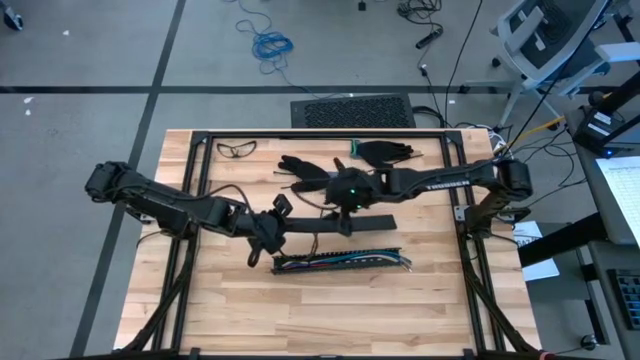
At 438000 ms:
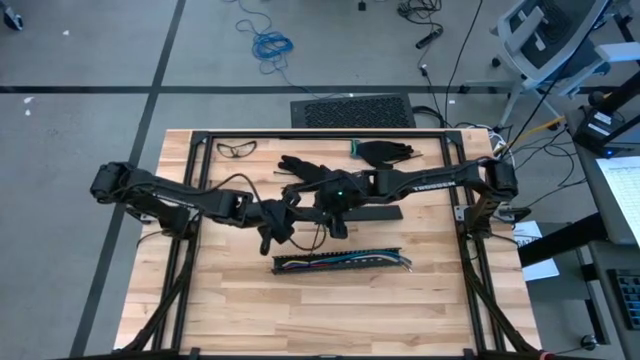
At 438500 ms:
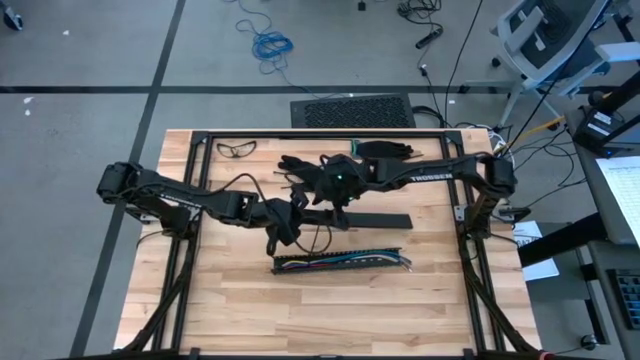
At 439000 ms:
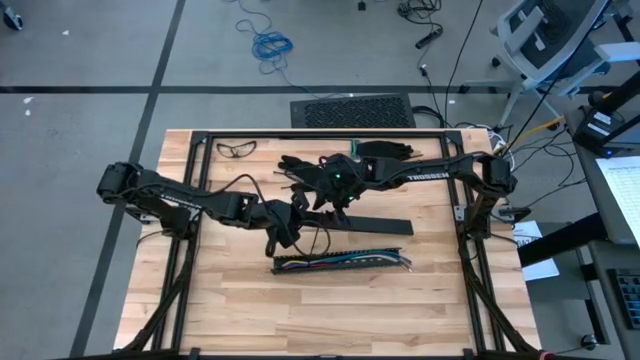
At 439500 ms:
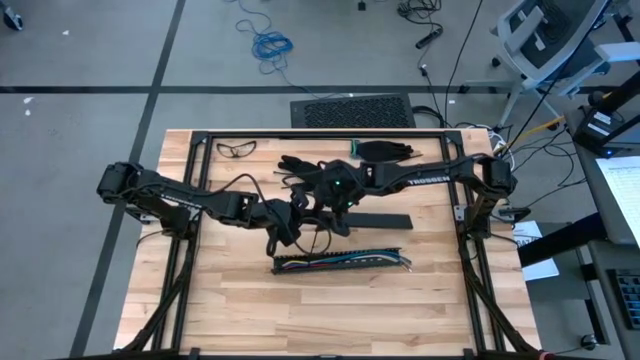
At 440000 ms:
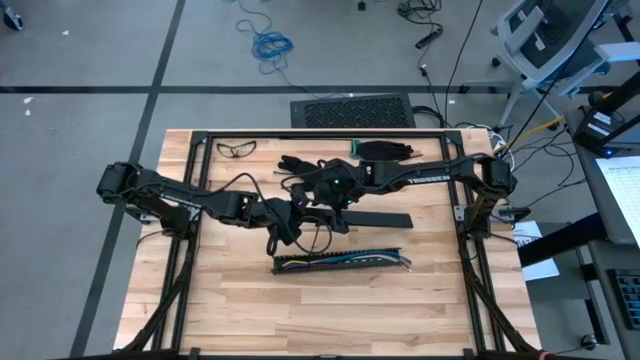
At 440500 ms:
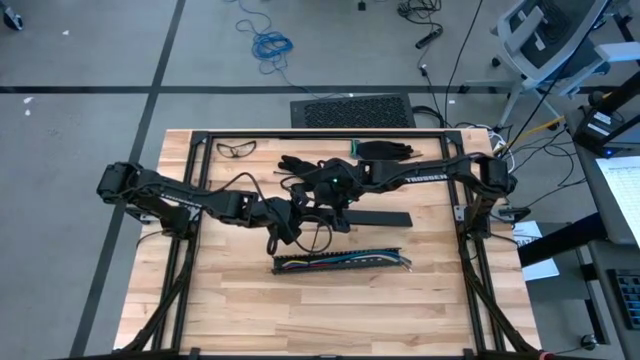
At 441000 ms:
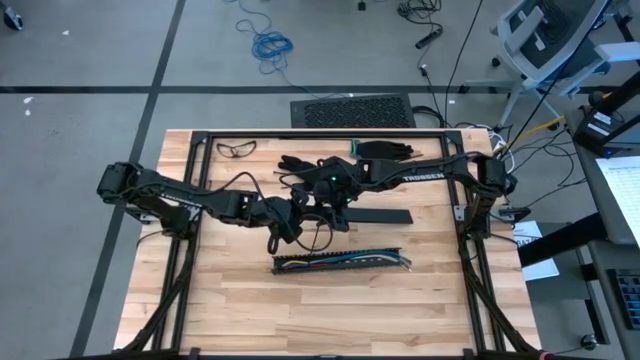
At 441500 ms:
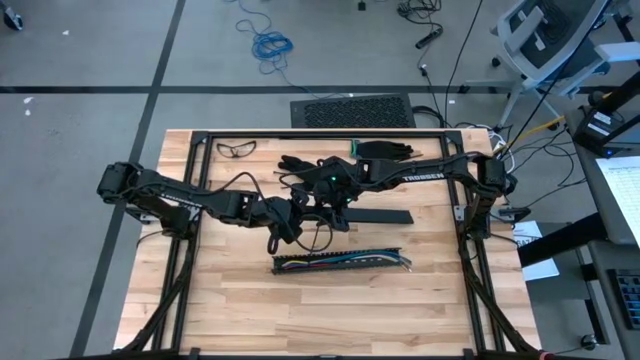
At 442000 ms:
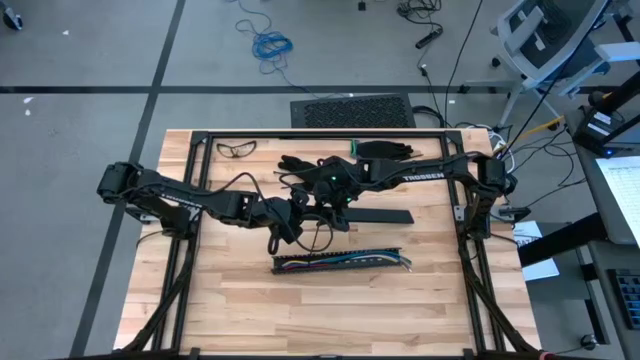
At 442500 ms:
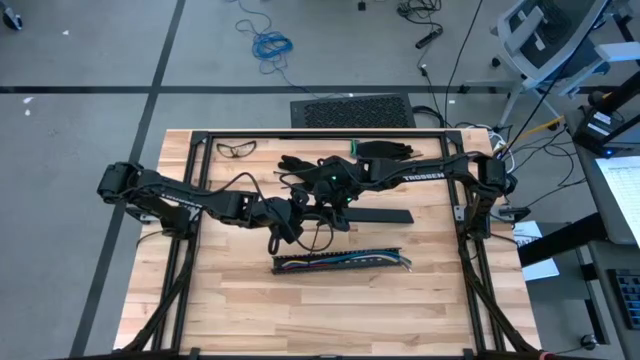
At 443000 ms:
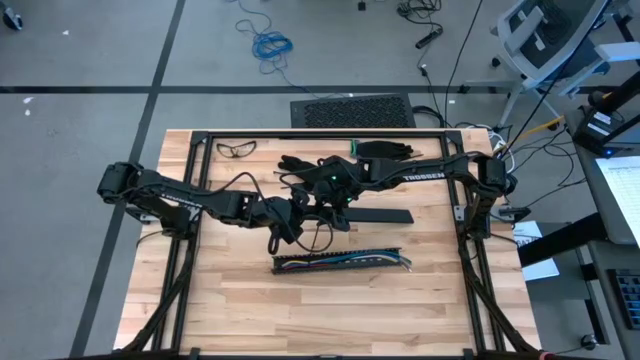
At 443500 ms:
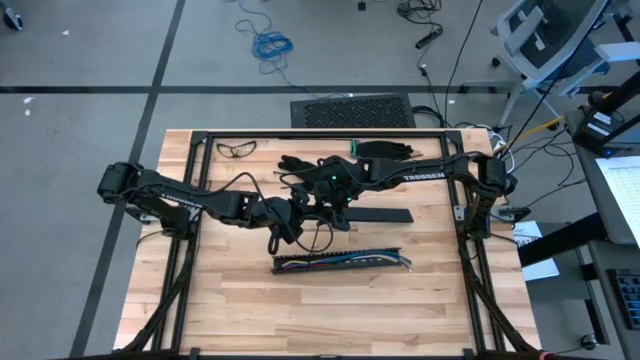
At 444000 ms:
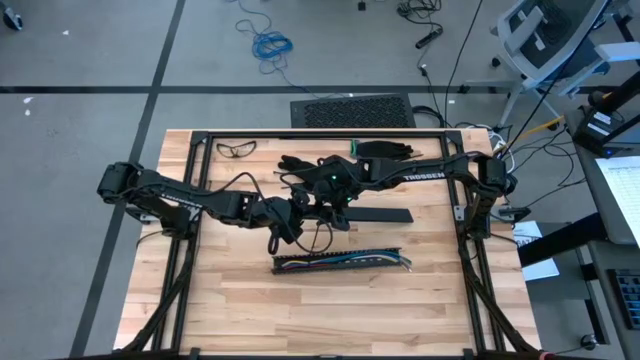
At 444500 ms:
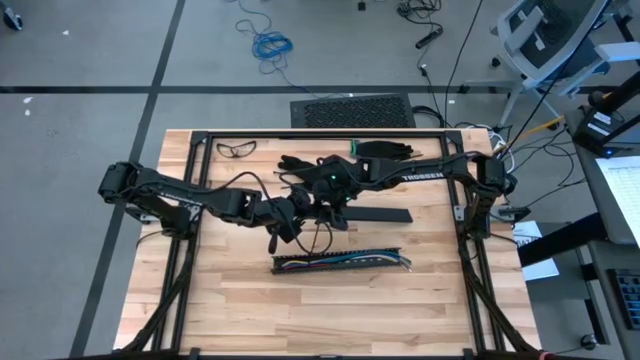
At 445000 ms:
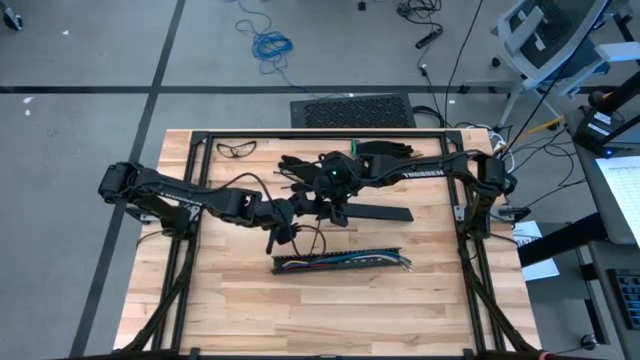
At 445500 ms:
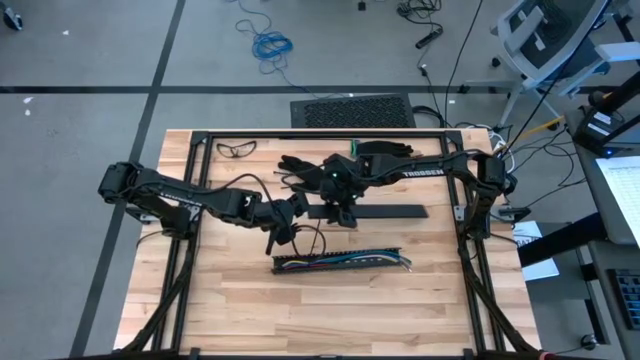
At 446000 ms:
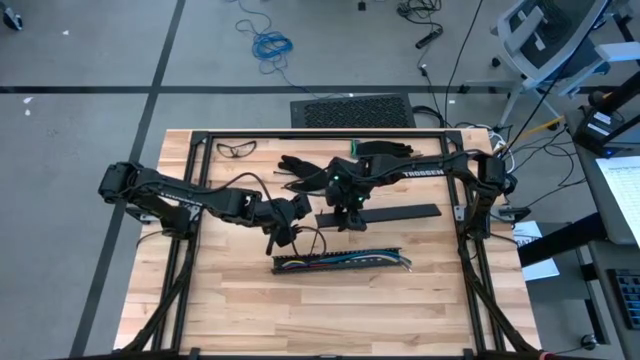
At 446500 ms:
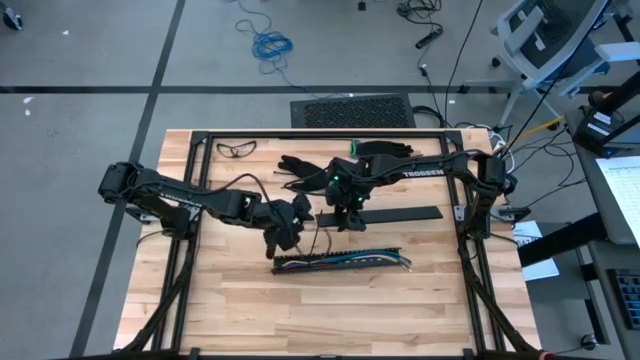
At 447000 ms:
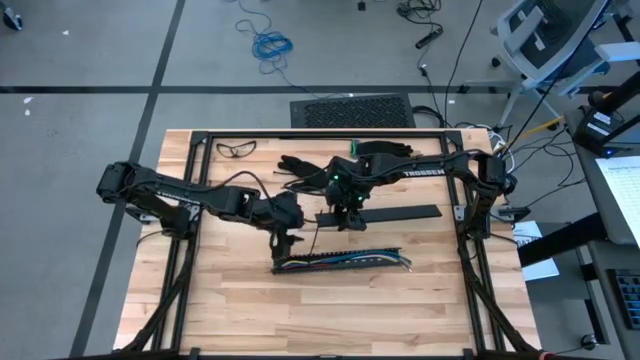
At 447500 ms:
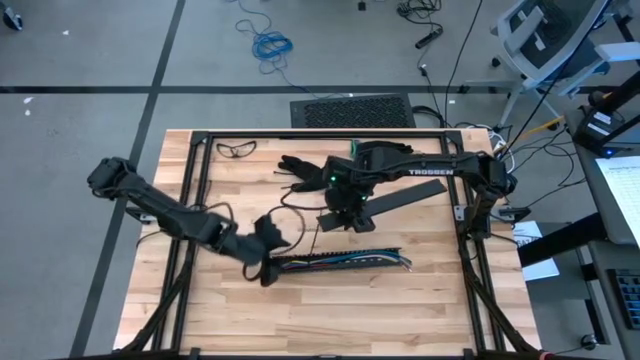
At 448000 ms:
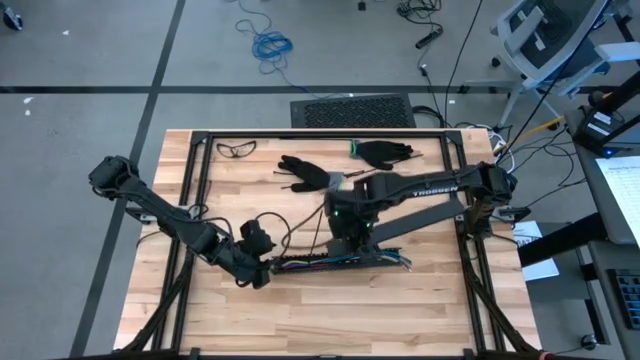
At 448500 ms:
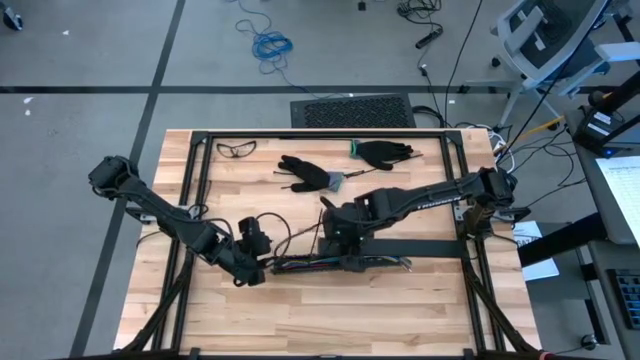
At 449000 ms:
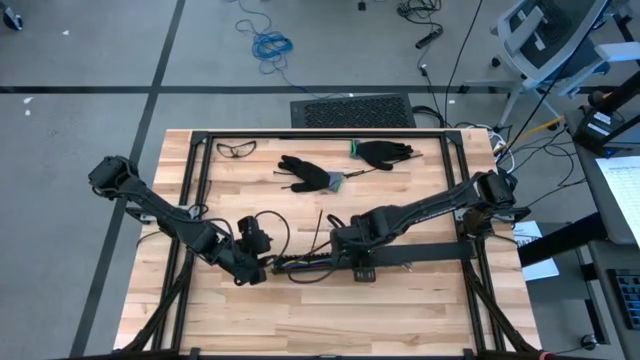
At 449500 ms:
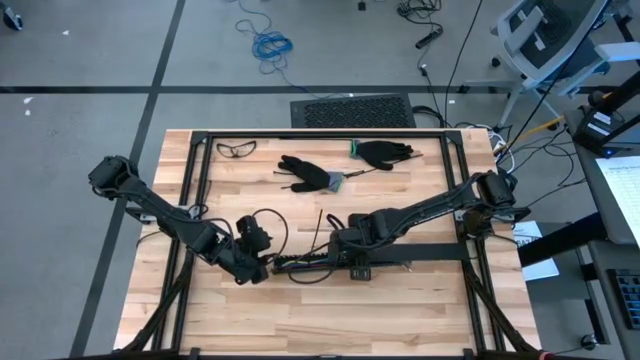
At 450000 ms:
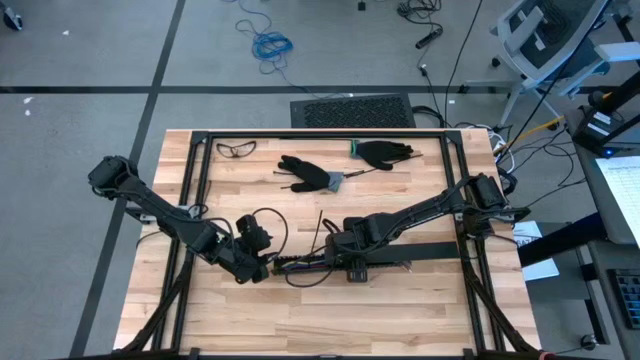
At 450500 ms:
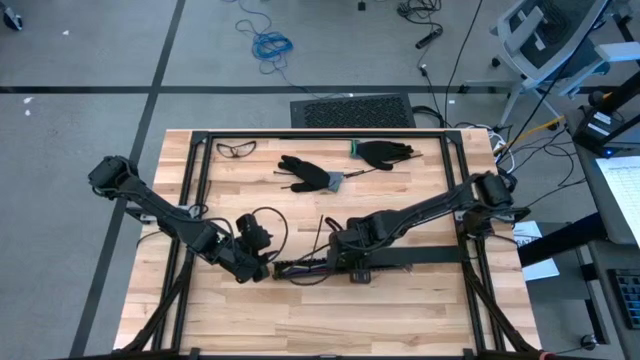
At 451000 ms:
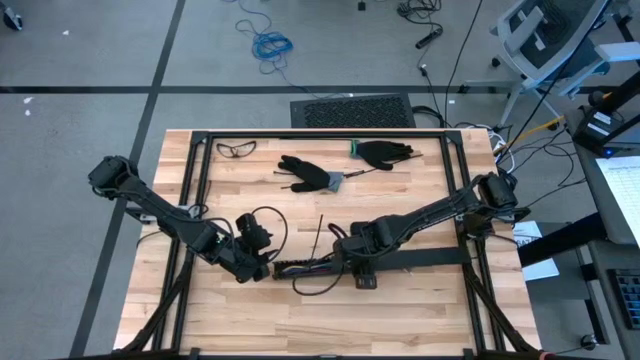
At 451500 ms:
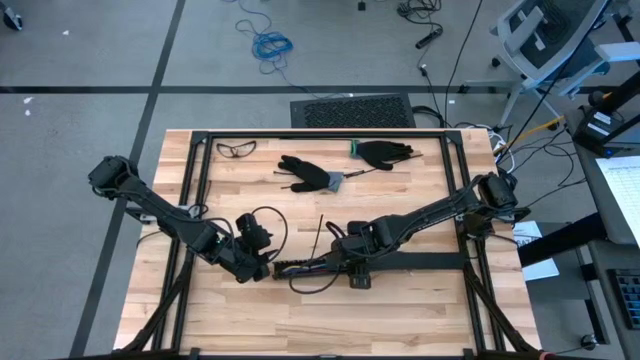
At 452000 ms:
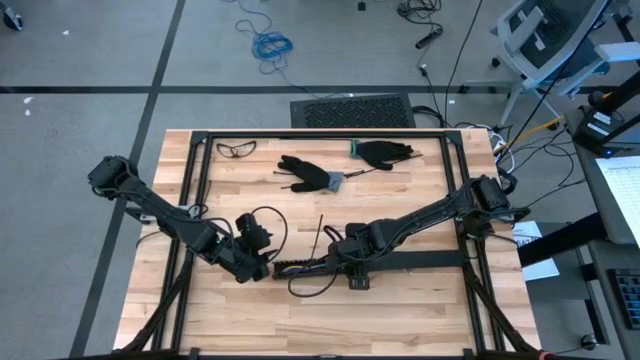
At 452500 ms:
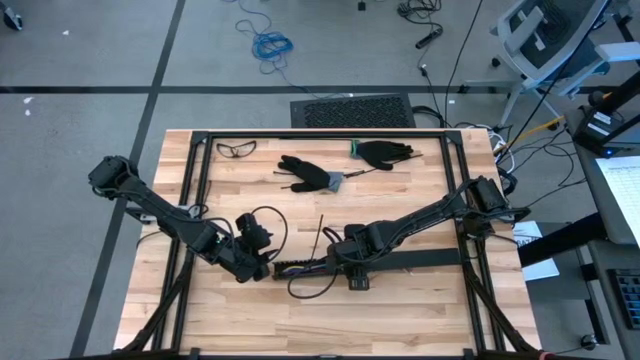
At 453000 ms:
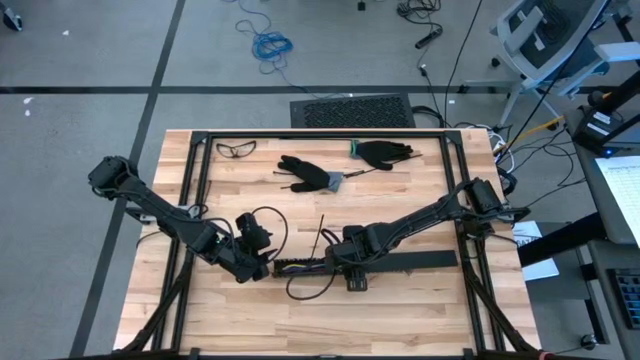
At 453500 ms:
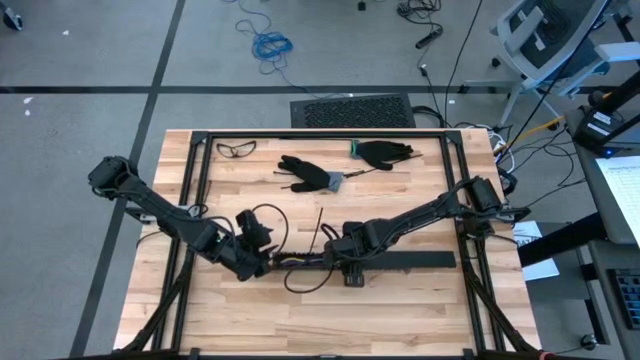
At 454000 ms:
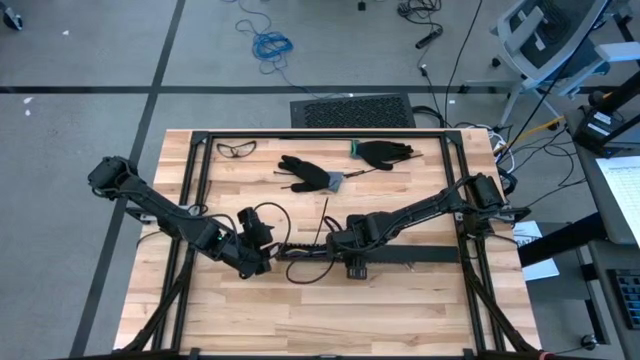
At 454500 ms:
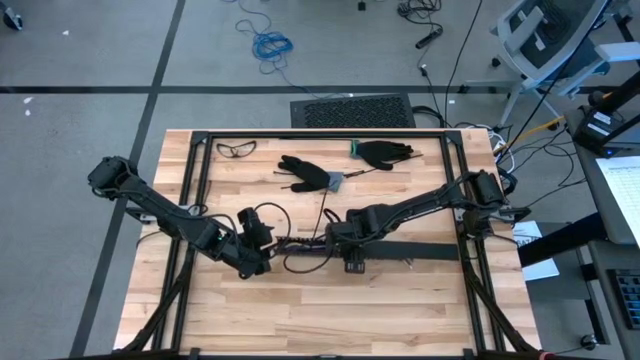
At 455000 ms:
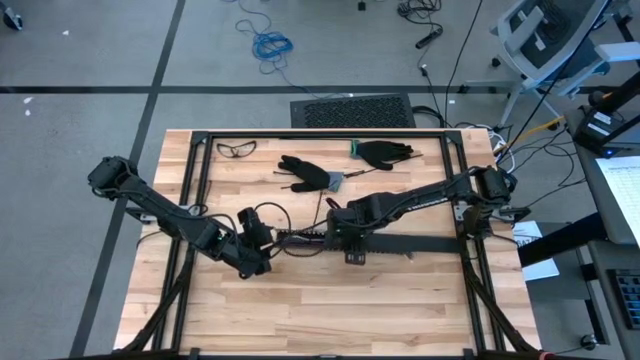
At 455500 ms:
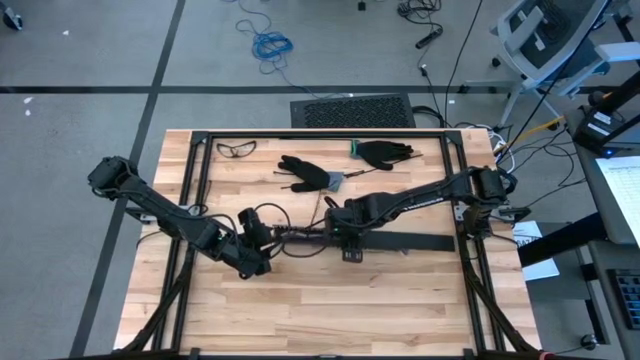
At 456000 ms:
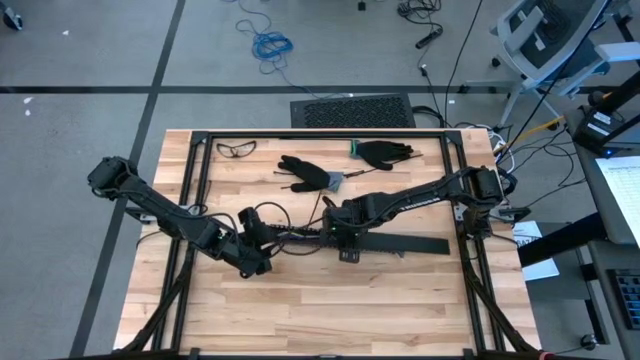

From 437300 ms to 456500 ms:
Task: Ziptie cables
Insert the black cover of the black cable duct

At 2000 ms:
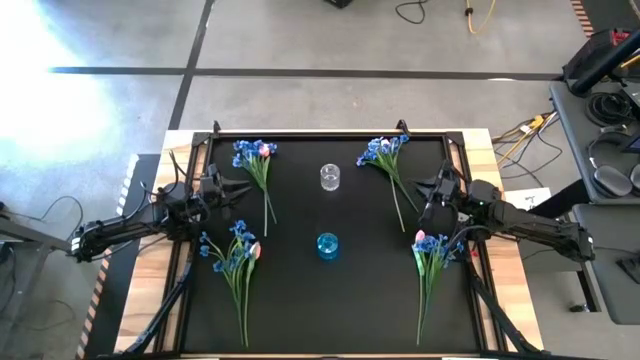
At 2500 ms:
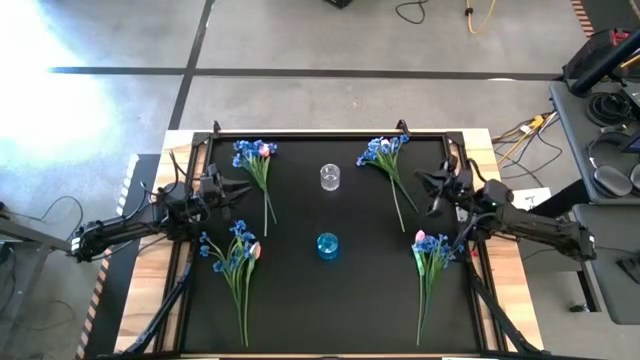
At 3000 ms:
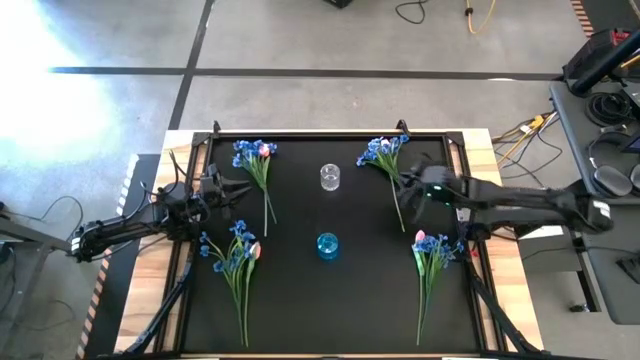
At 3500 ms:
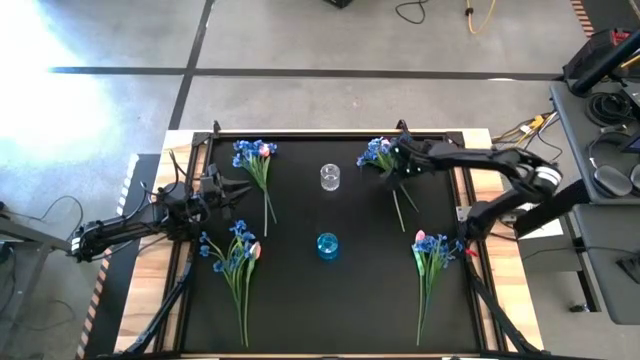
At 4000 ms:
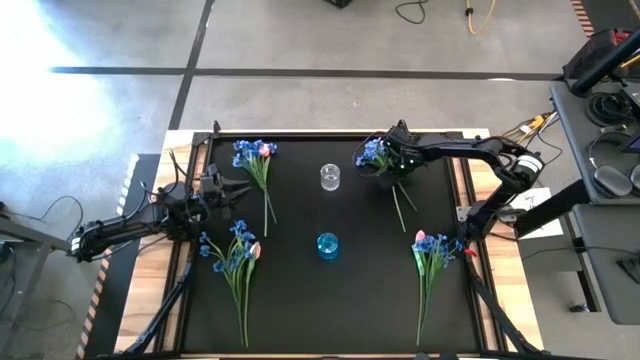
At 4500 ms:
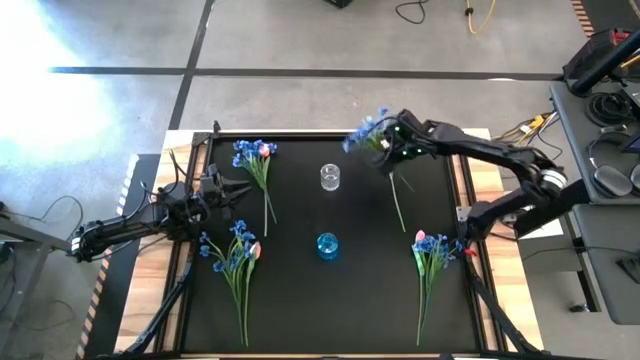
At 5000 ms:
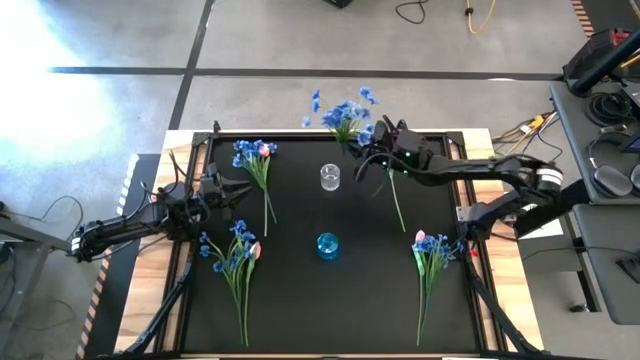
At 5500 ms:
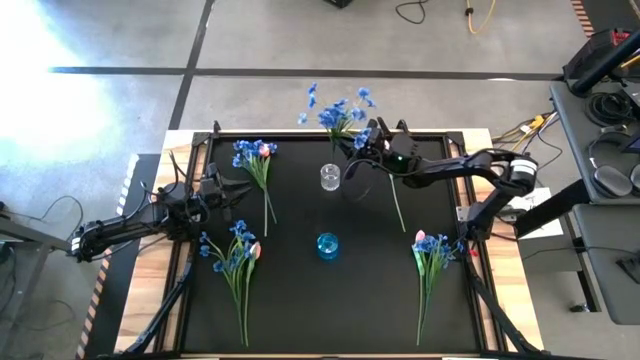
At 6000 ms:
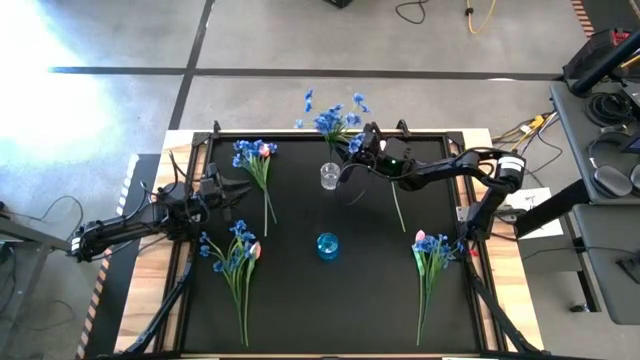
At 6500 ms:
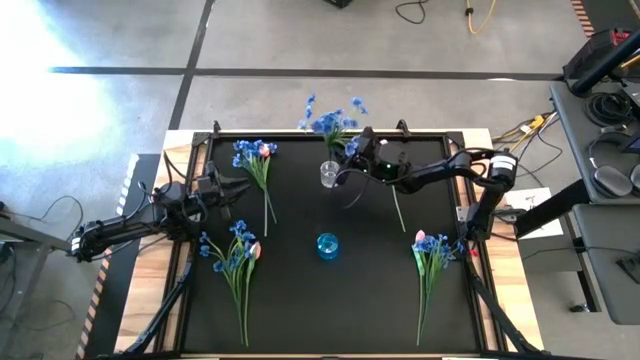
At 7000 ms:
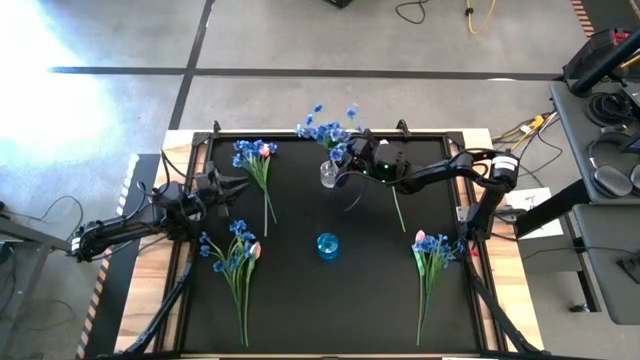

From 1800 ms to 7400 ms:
Task: Sort flowers into vase by color
Put the top right blue flowers into the transparent vase
